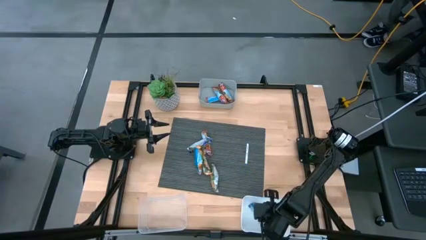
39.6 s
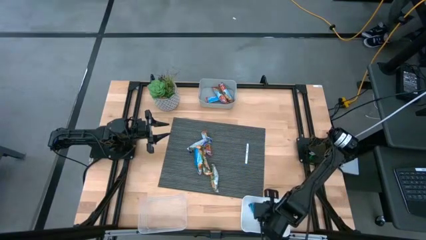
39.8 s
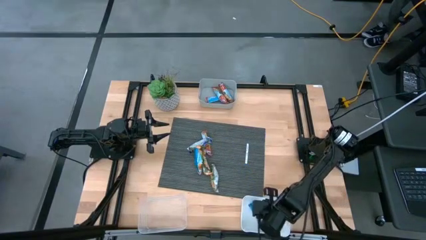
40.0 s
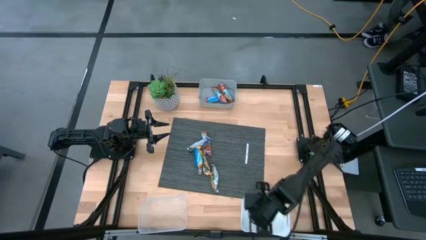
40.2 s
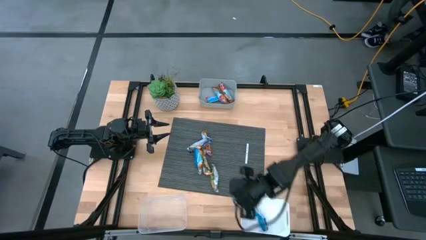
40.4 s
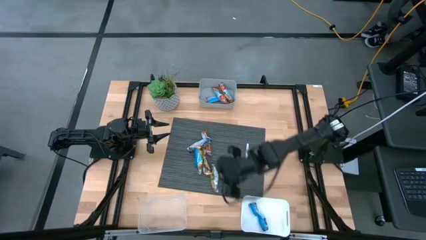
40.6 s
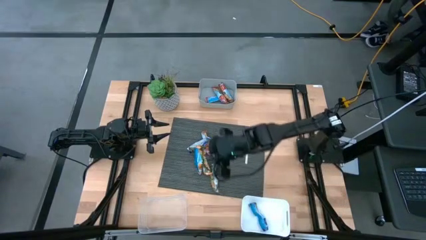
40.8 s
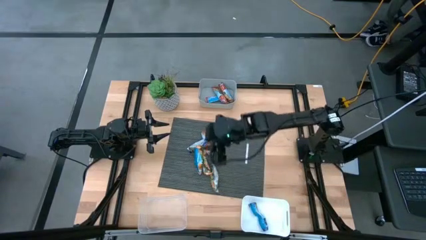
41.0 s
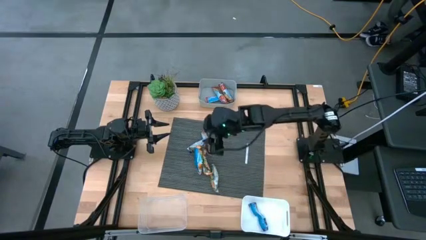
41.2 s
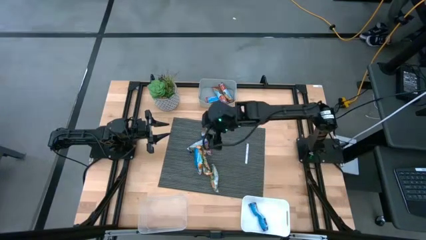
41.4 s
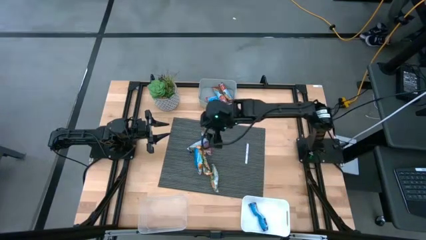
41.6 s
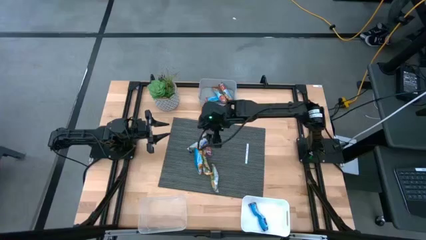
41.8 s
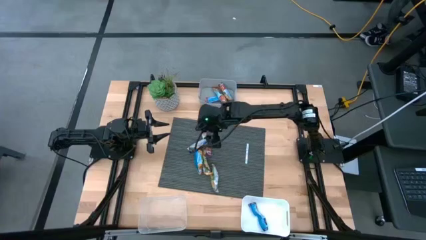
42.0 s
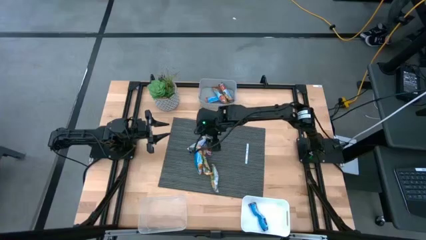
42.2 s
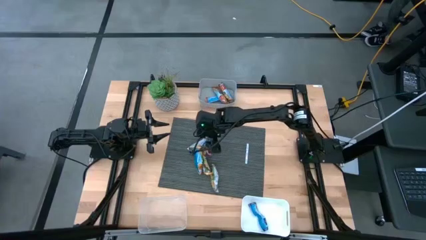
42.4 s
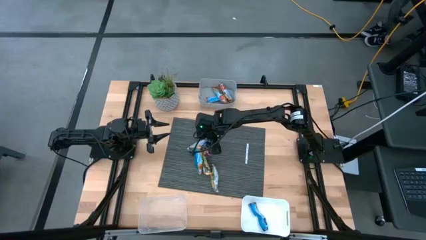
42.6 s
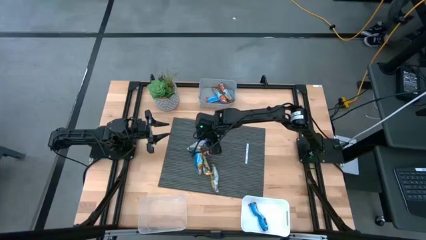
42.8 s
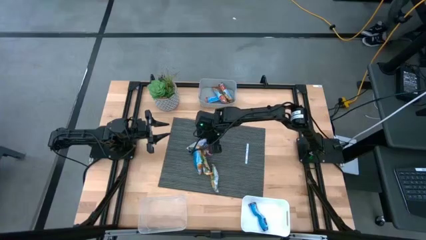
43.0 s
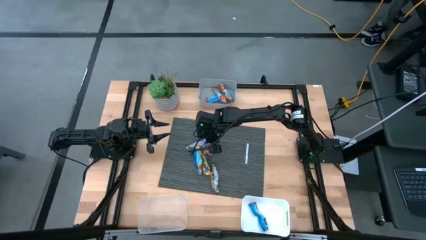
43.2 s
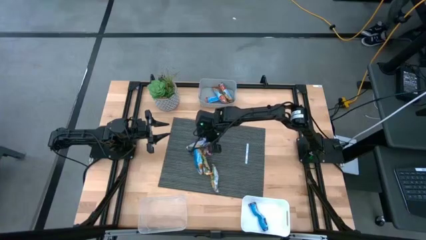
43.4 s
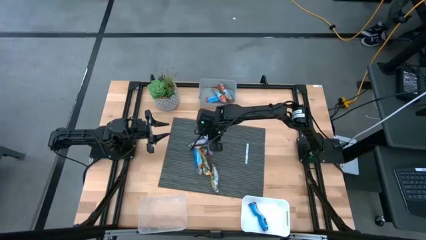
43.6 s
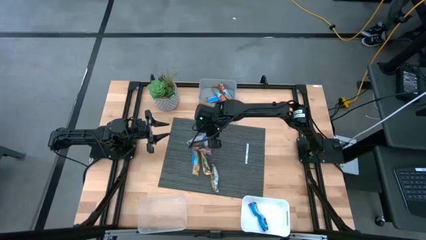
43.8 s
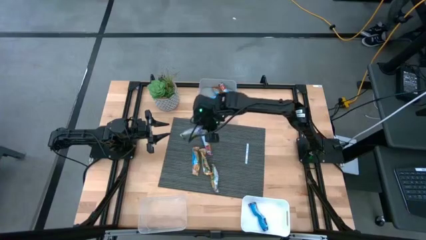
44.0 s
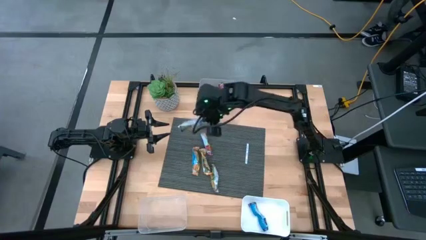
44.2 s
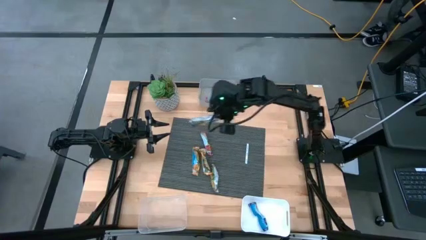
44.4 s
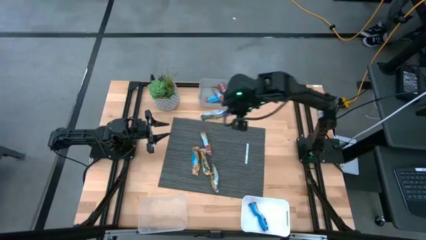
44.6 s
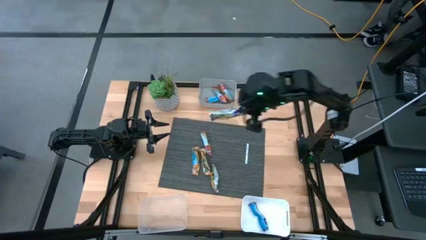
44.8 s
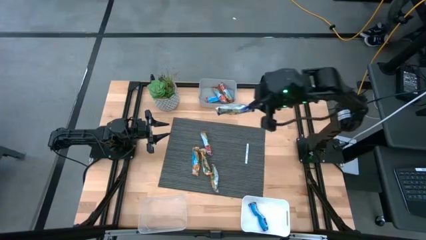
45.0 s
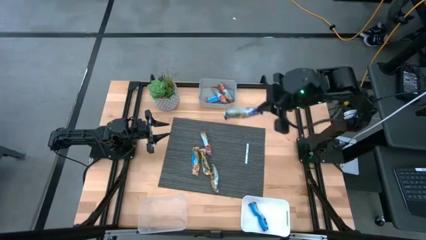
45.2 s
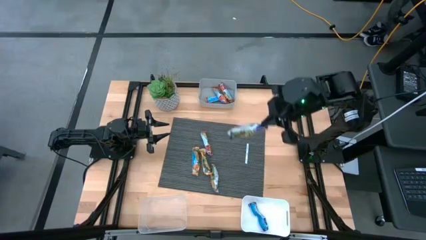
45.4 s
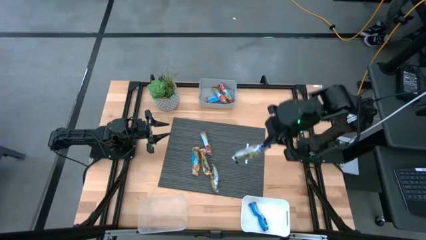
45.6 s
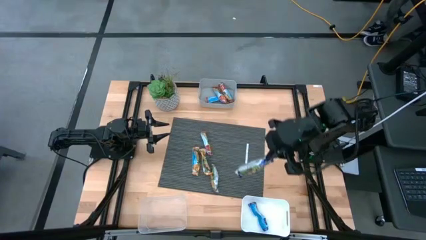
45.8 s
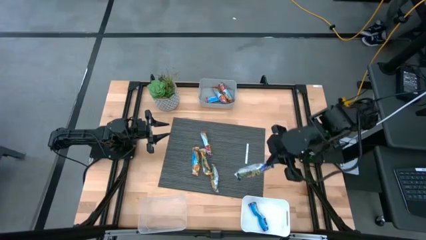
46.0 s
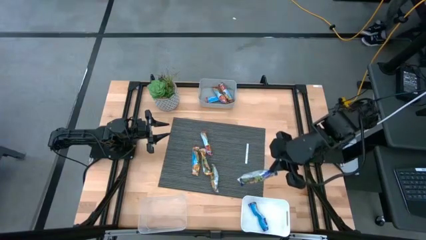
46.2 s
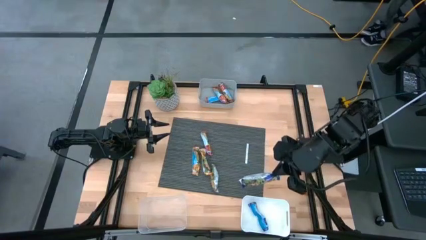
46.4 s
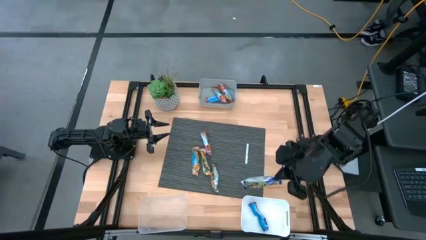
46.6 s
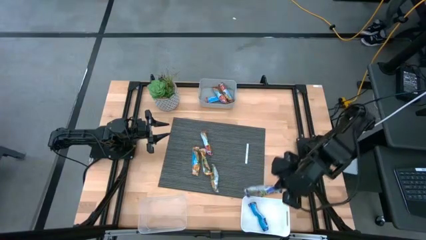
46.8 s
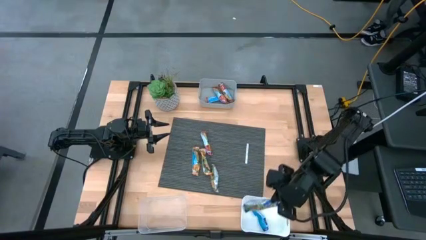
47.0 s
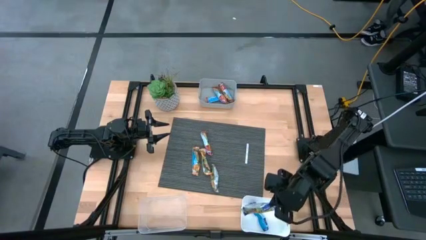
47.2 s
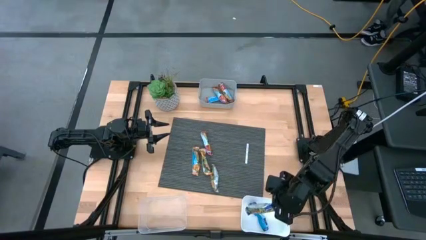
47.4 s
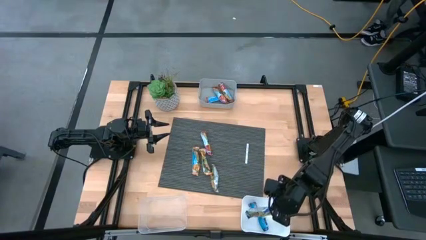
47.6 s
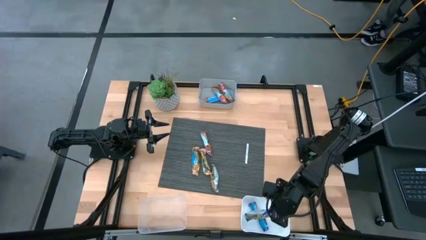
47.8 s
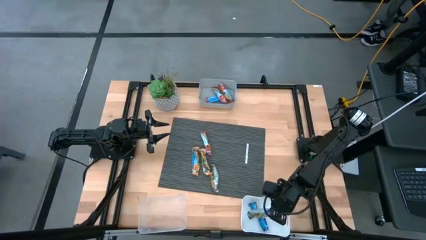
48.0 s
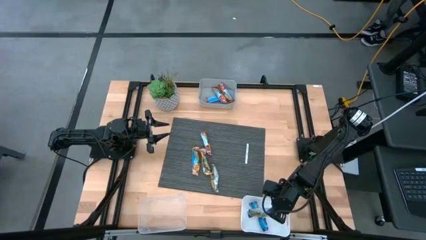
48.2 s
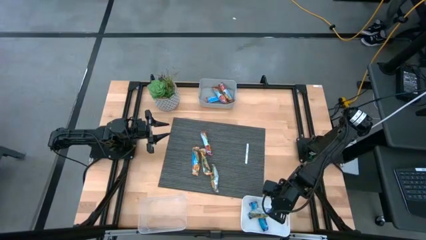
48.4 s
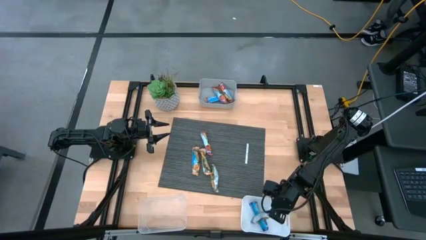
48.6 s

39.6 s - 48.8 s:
Task: Pick and place Granola Bars by type
Put the blue granola bar into the white bin

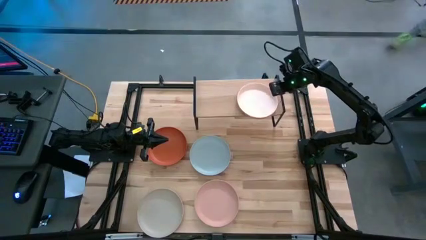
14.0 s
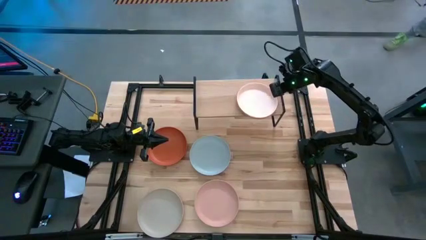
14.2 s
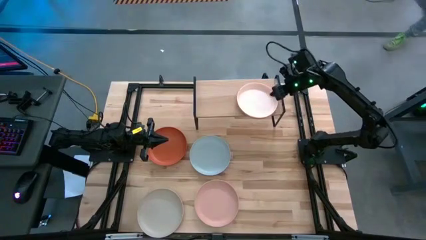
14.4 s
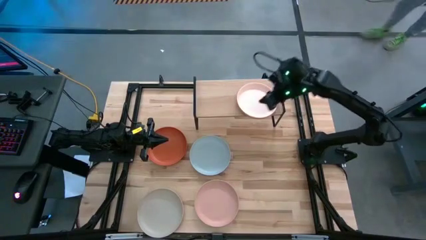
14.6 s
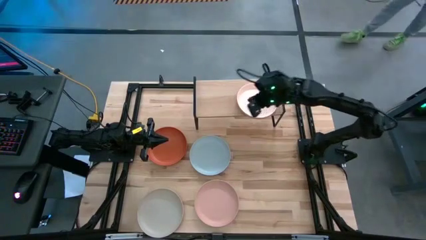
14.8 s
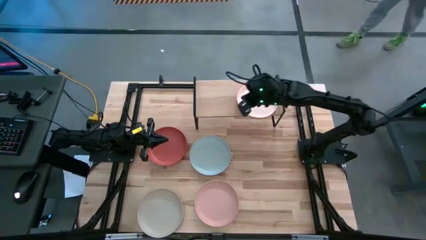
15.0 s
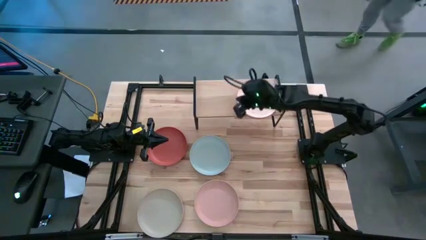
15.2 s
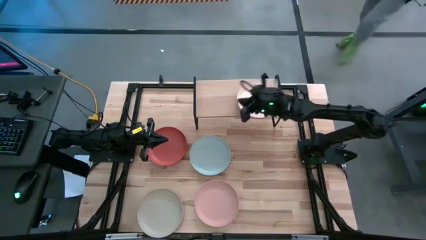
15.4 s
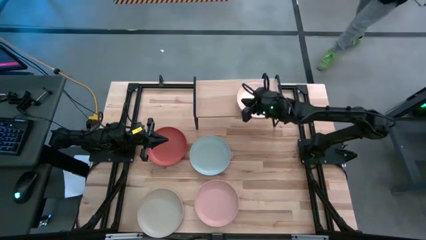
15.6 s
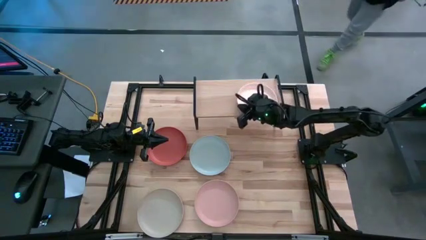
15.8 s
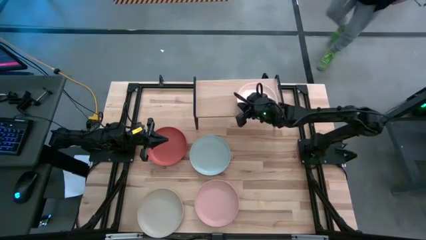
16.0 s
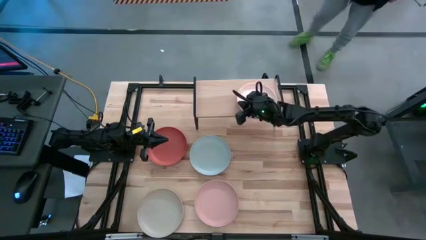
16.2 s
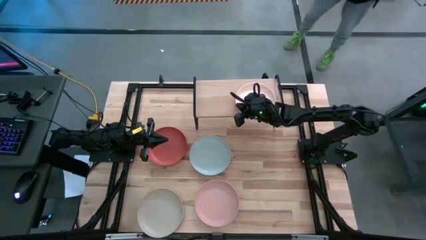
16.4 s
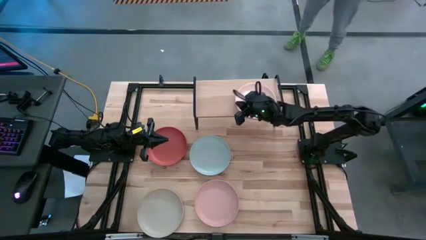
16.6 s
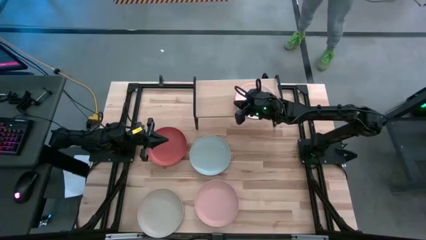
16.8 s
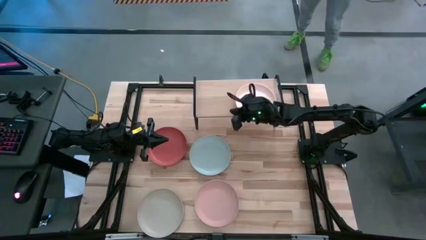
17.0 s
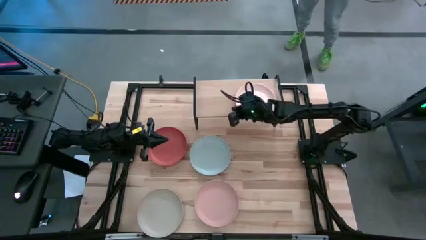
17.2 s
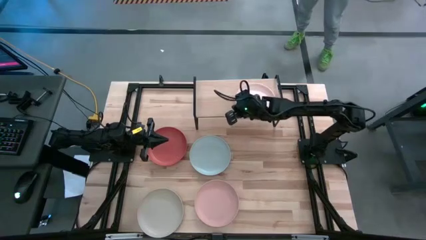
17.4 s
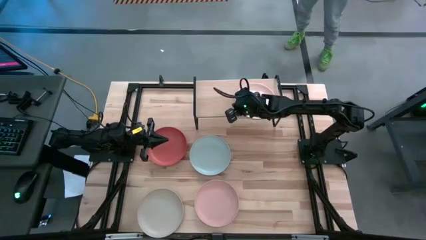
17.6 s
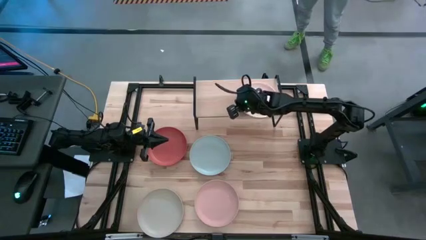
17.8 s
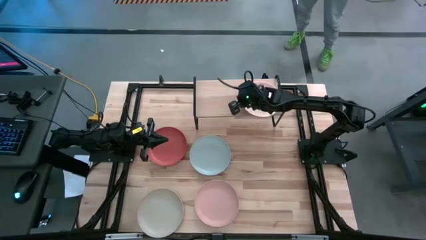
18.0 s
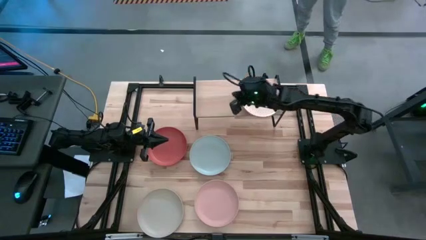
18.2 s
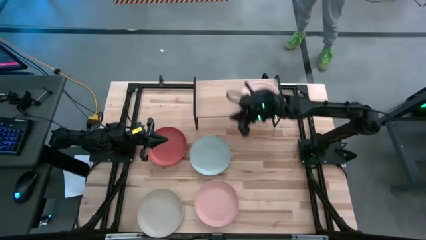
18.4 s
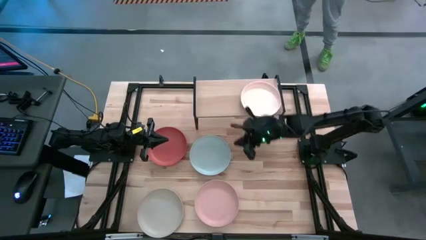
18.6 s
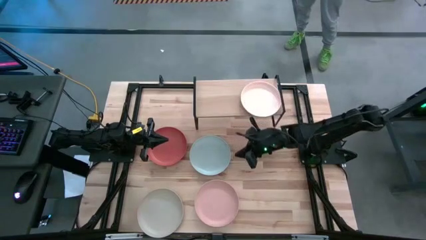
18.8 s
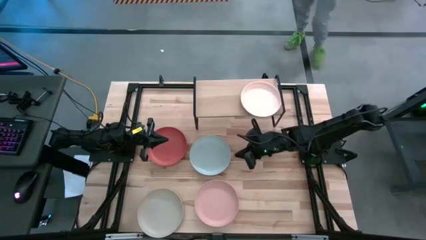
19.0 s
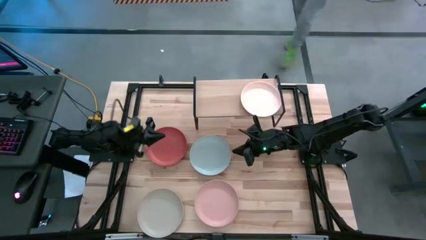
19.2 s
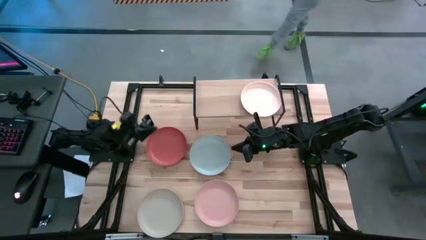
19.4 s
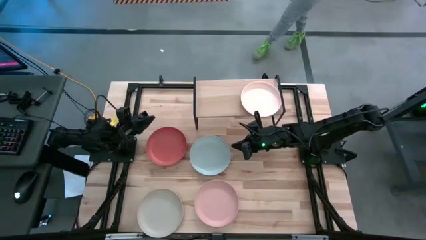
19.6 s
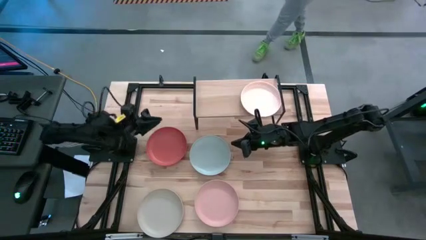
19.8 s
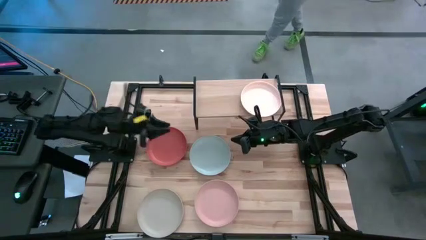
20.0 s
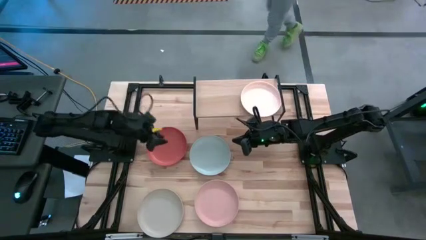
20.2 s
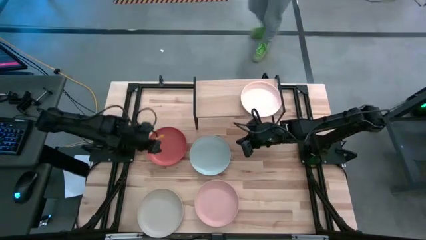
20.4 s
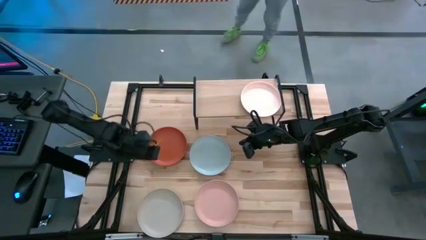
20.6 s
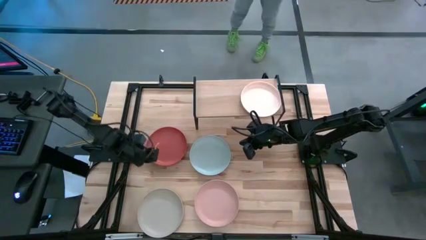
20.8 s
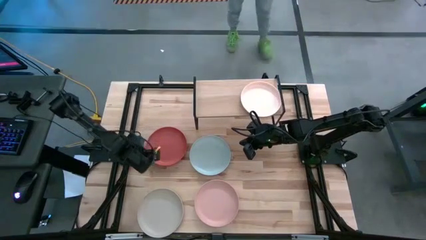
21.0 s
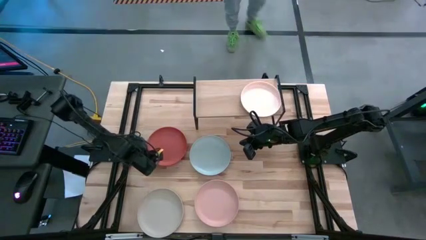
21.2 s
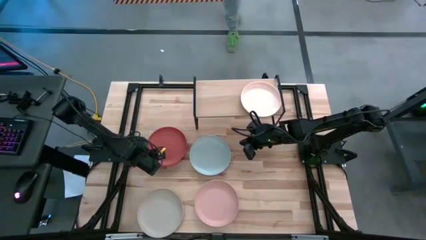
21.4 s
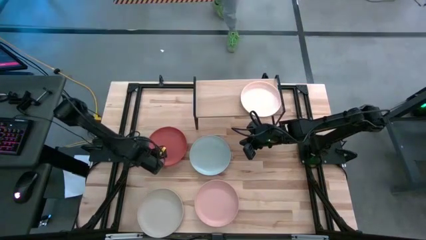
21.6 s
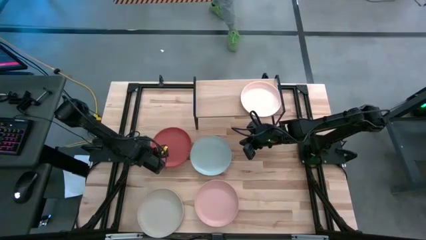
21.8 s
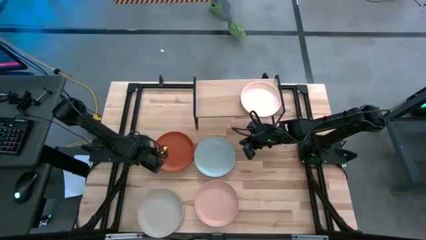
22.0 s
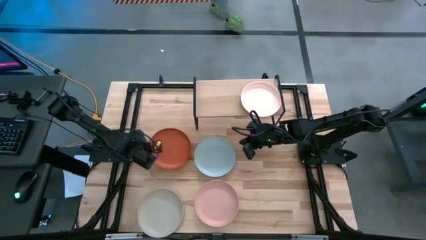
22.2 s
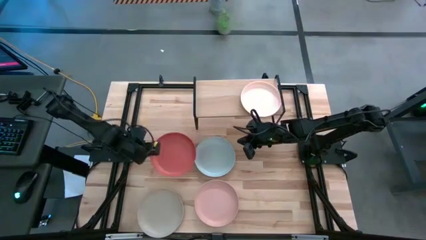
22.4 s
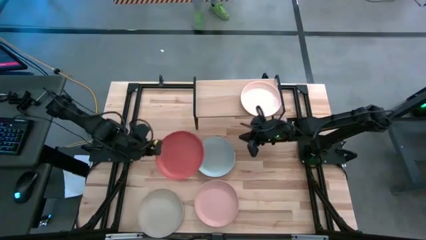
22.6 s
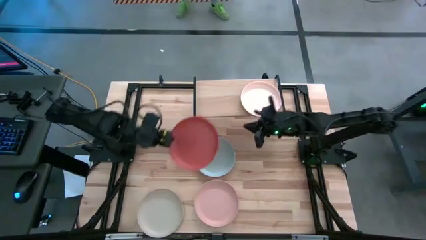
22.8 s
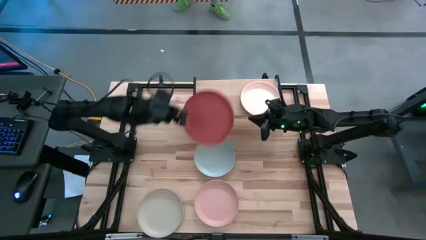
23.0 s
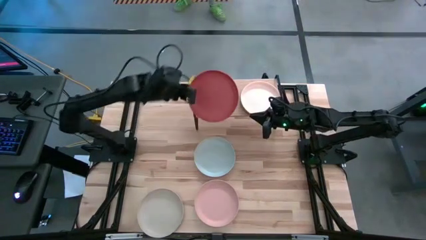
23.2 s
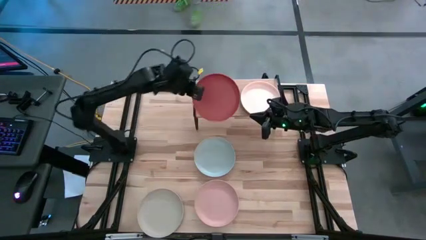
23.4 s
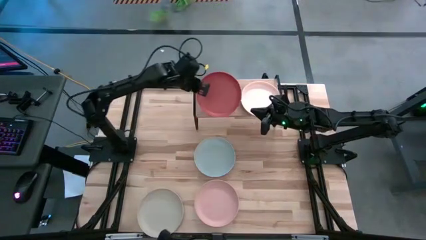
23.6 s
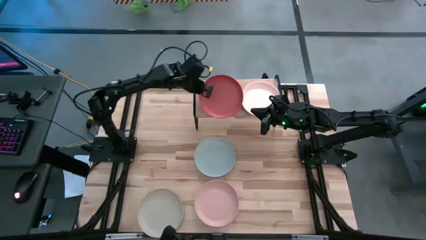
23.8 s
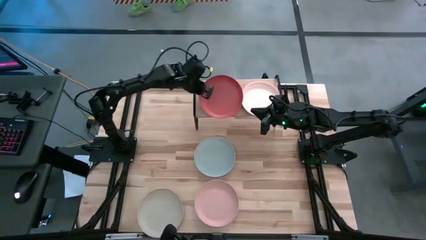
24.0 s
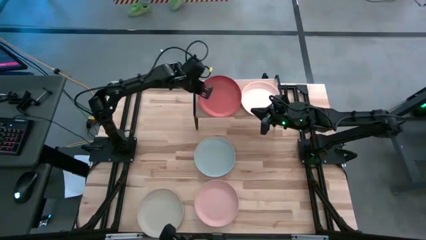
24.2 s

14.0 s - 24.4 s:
Task: Place and stack plates onto a shelf
Put the orange plate on the shelf
